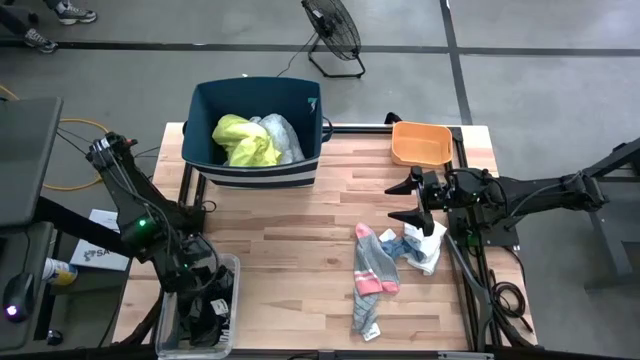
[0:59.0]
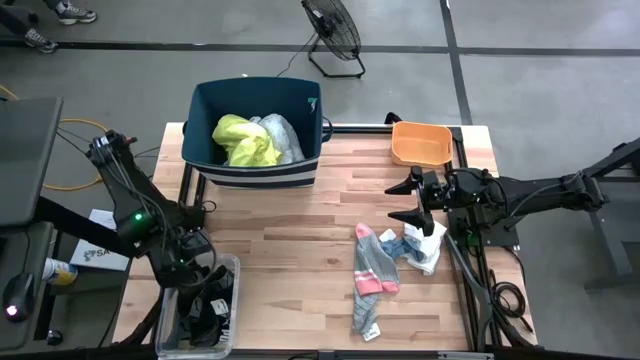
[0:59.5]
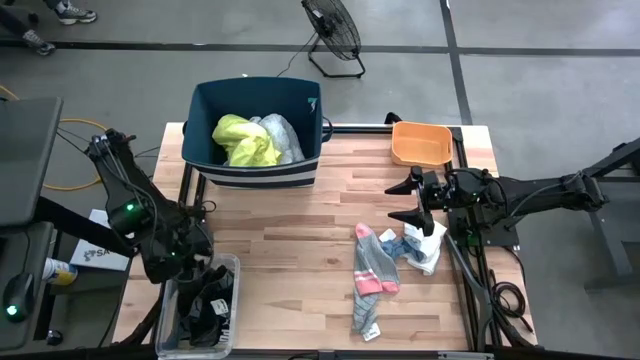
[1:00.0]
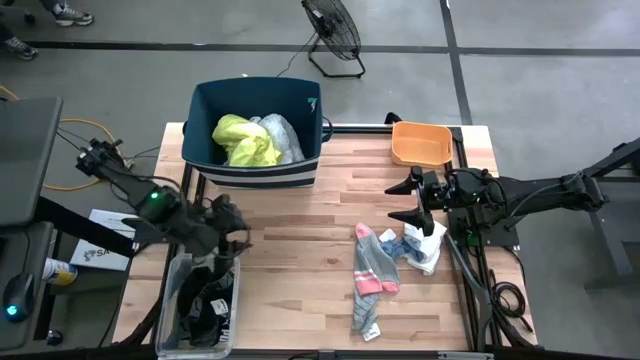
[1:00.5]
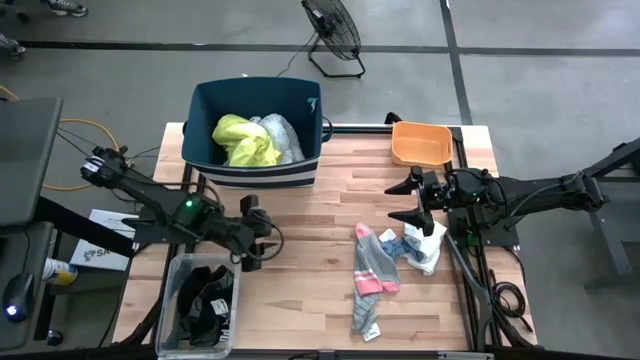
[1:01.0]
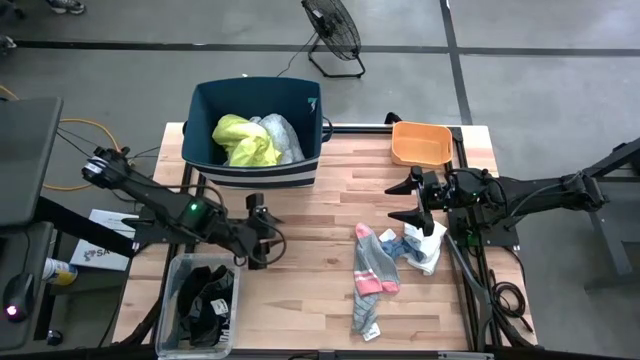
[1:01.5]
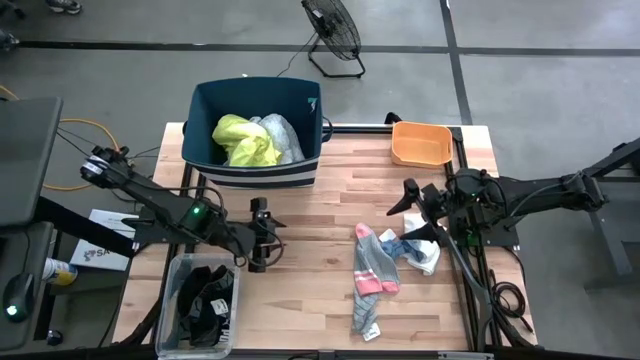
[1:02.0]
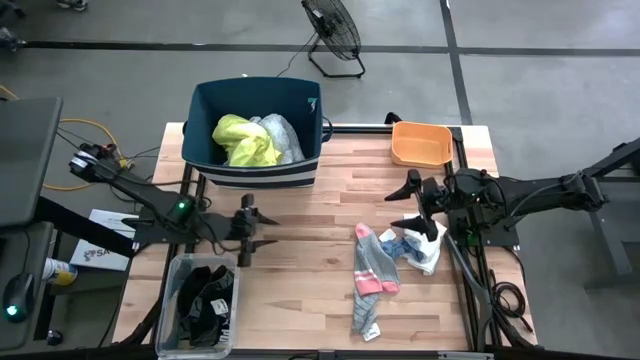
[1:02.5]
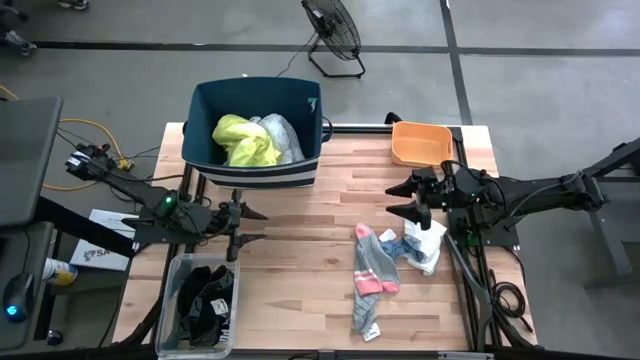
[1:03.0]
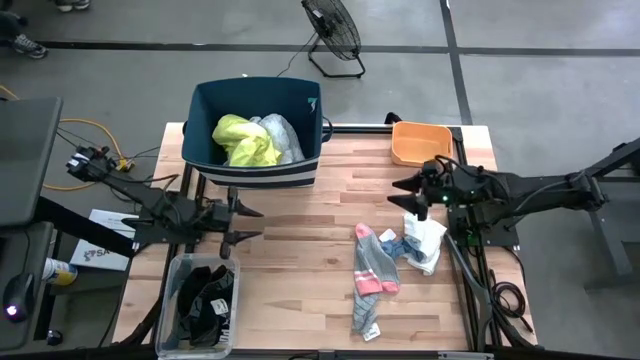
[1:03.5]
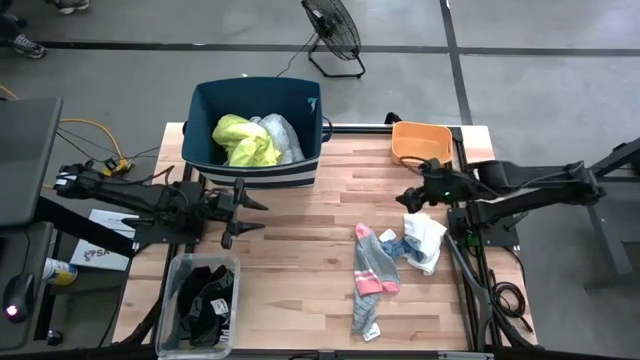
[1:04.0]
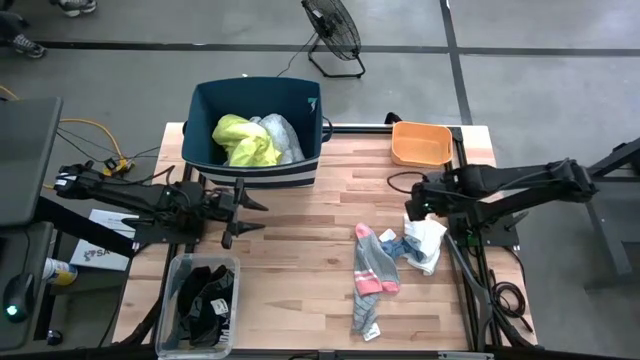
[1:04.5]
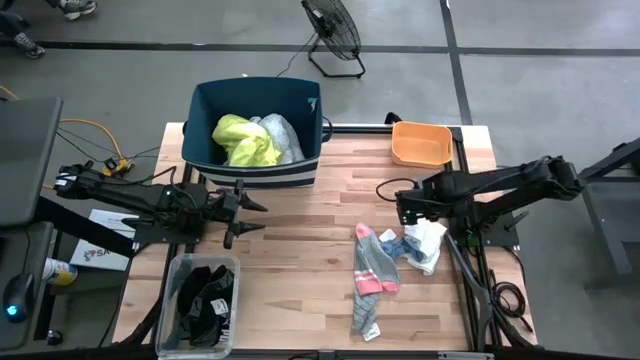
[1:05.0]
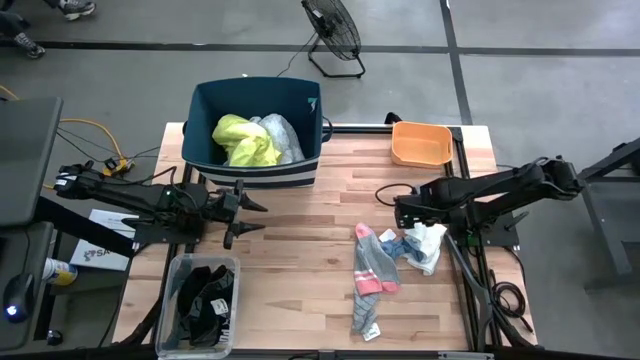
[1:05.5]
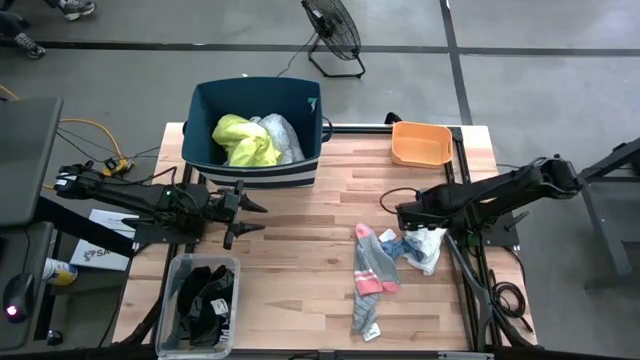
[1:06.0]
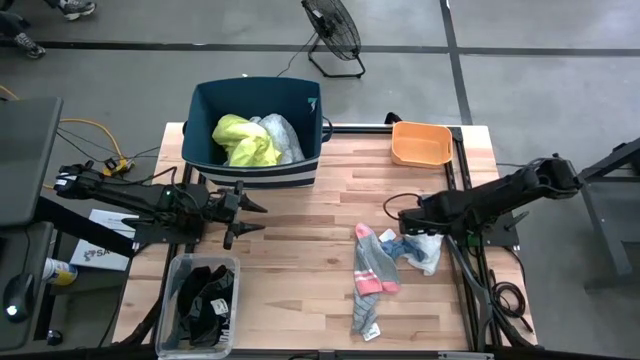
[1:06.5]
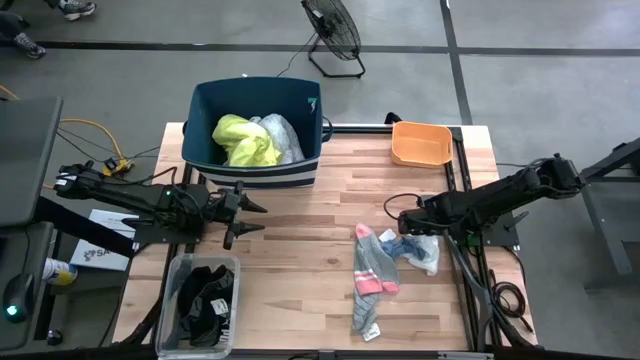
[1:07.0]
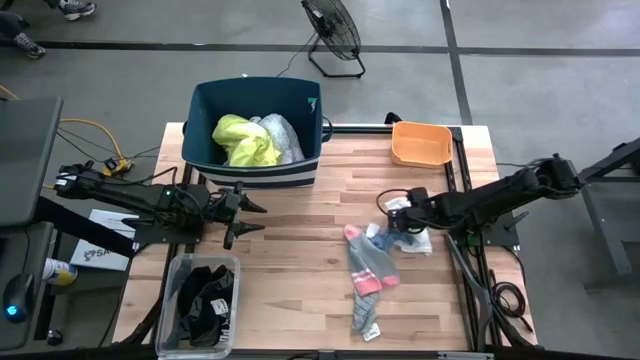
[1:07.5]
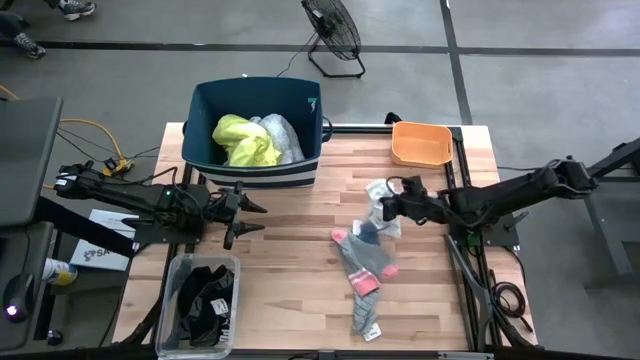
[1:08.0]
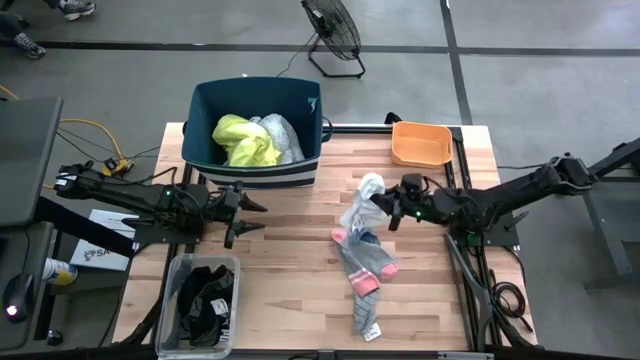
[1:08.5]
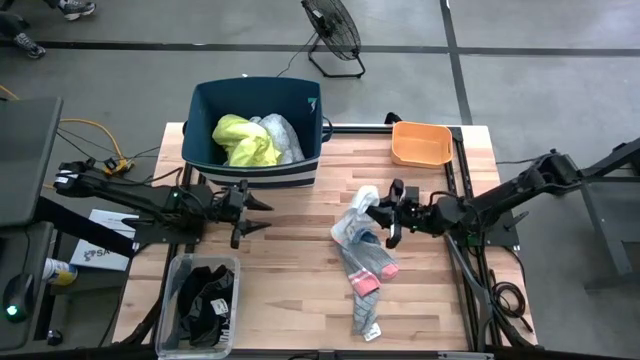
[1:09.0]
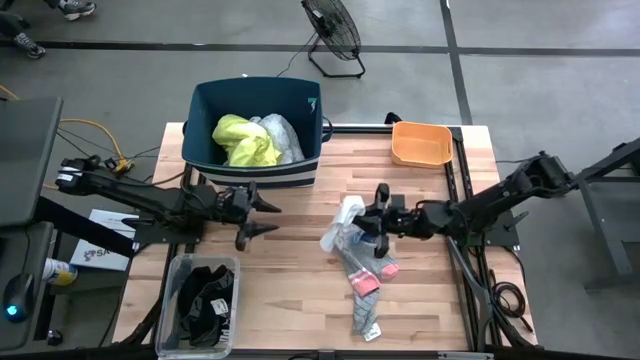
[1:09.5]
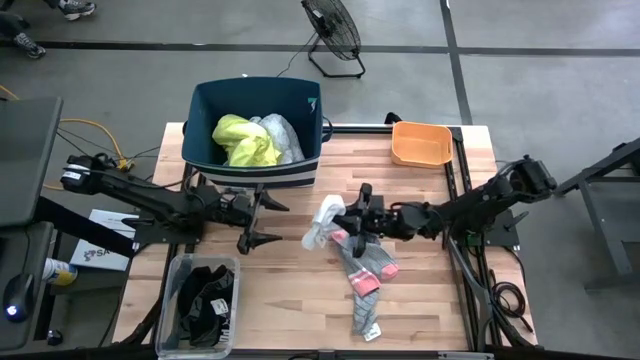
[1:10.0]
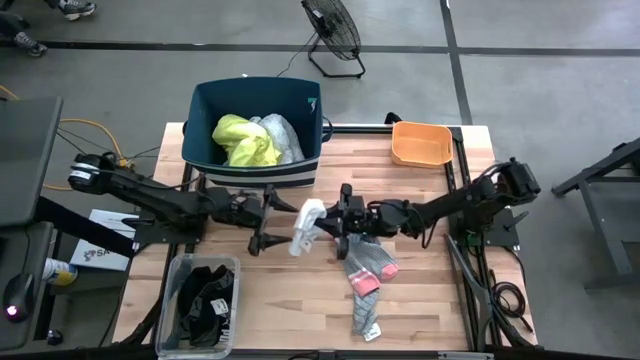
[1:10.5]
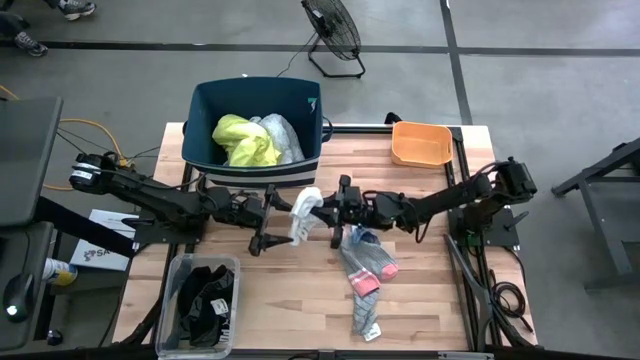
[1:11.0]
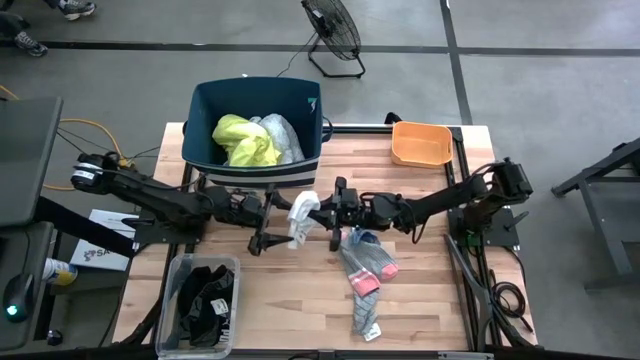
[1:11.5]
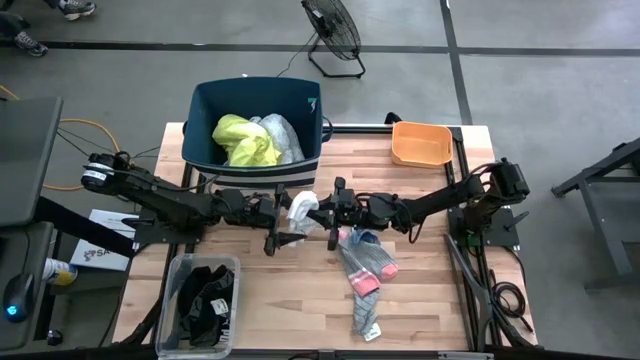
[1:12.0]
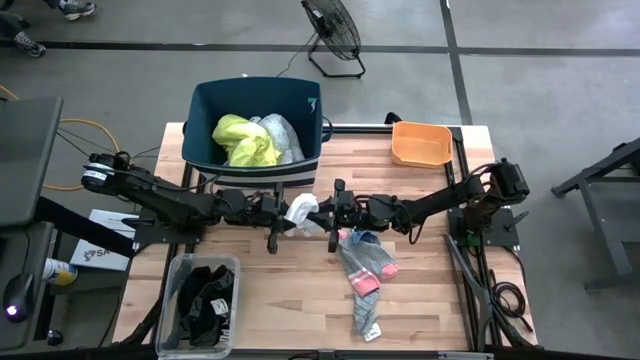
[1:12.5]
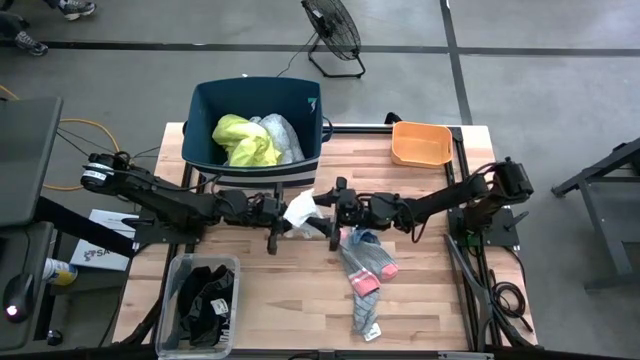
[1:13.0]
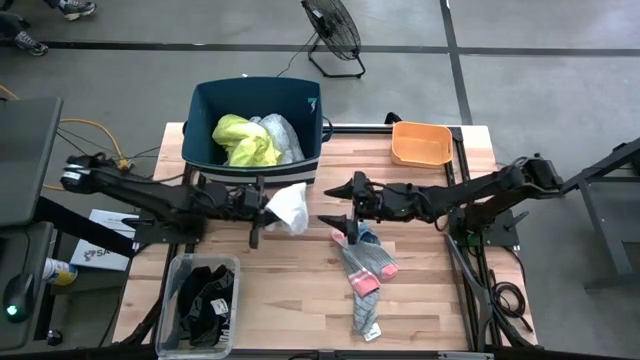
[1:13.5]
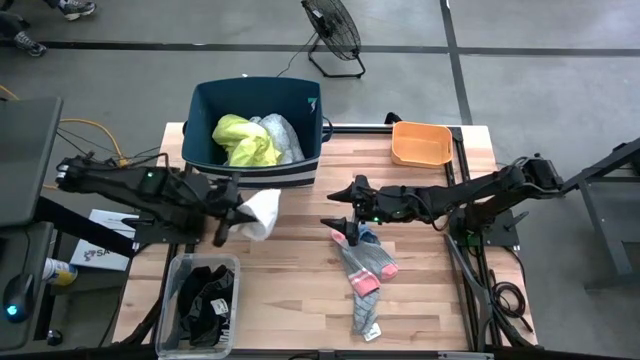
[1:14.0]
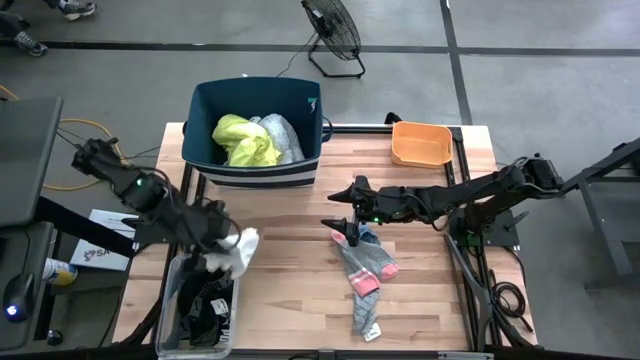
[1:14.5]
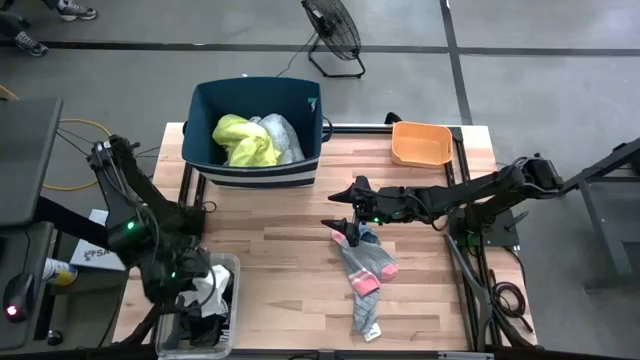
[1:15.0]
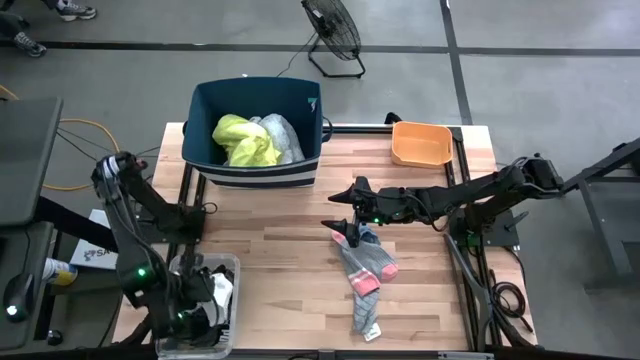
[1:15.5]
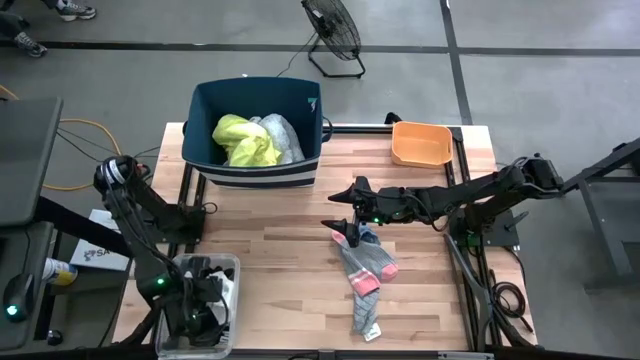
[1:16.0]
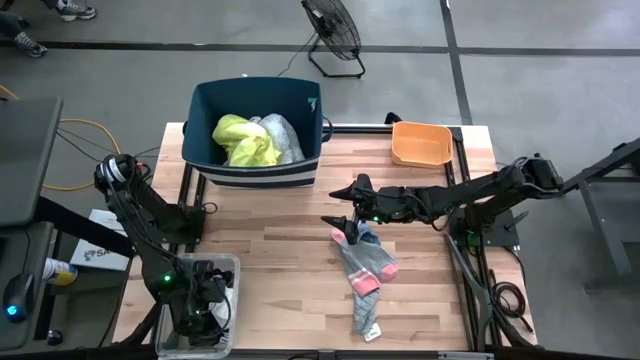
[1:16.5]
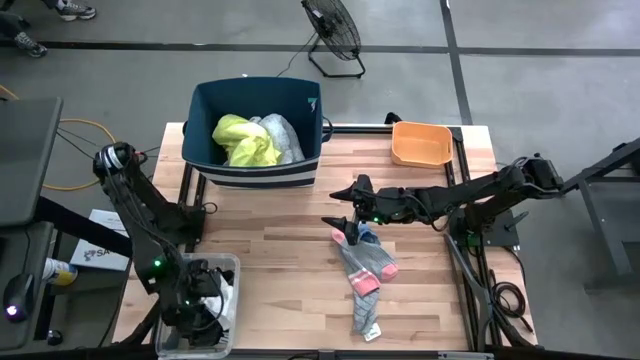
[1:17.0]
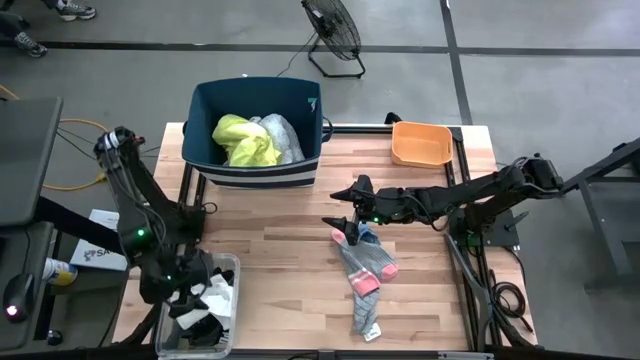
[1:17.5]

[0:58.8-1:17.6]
Task: Pick & Place Cloths
Put the white underwear into the transparent bin

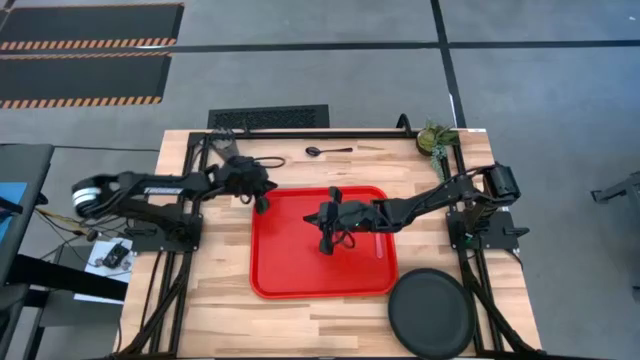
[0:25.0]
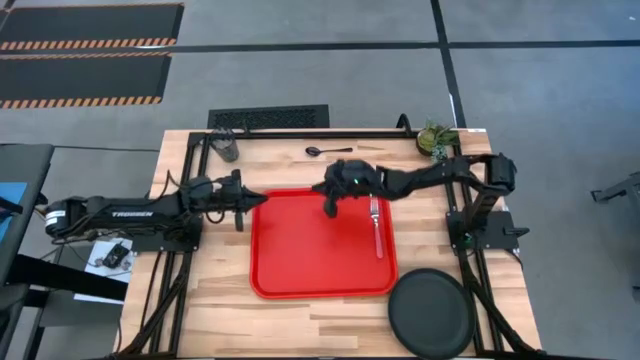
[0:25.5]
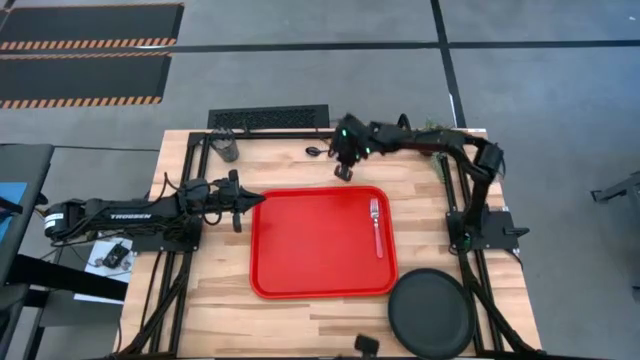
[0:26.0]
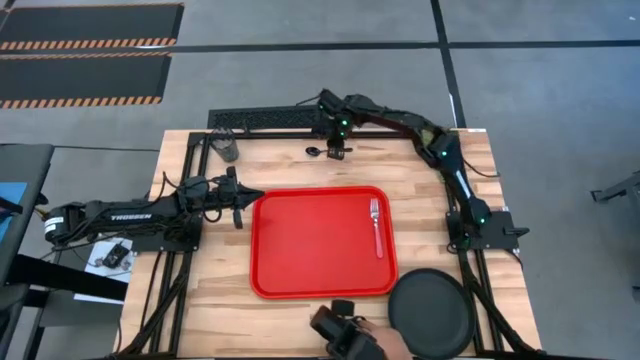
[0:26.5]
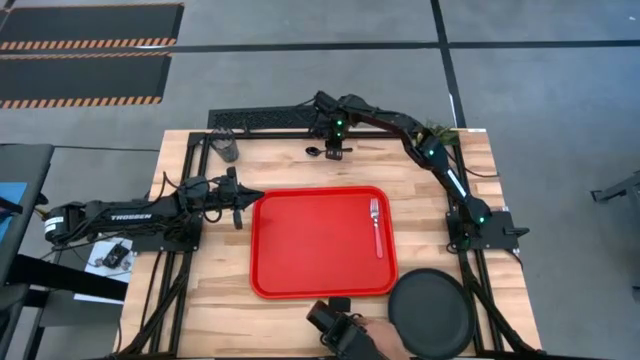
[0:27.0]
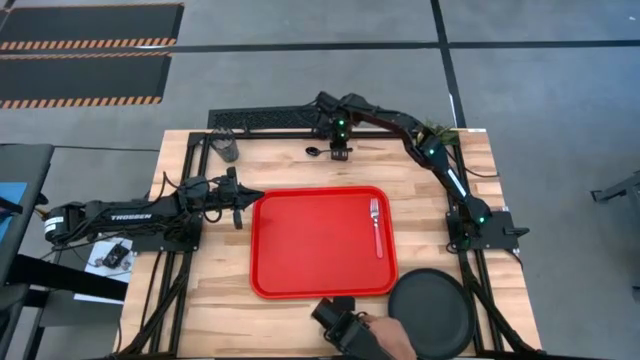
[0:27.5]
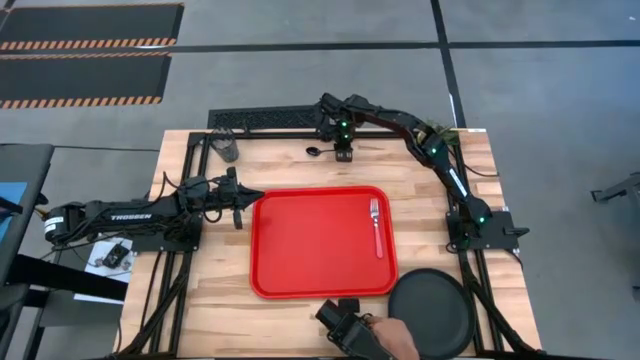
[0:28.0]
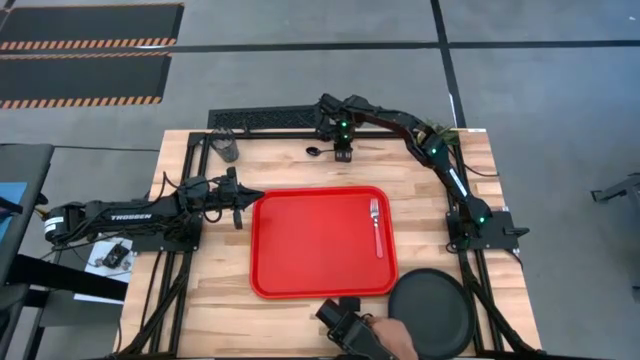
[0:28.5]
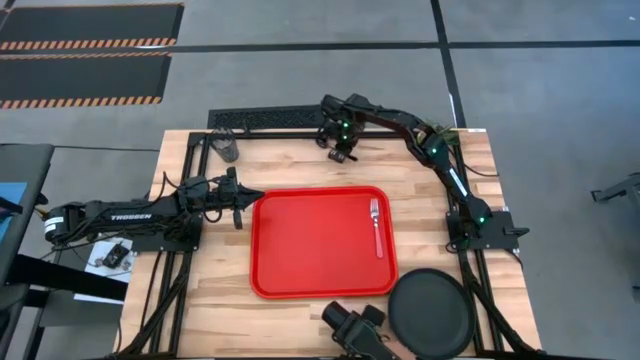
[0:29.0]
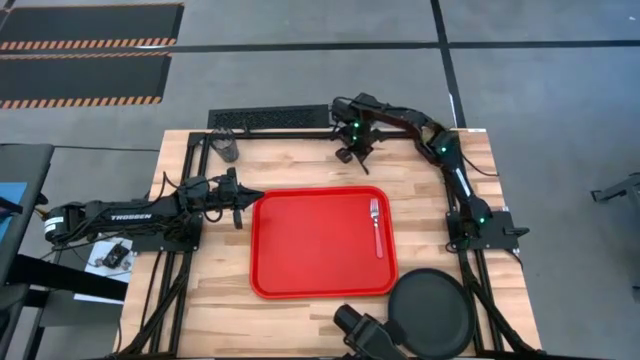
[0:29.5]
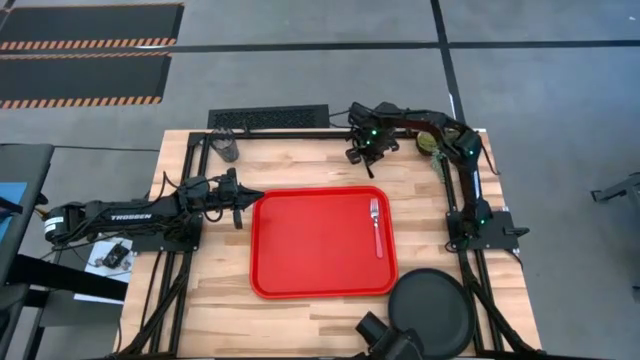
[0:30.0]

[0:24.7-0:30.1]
Task: Pick and place plate/cup/fork/spoon on tray
Put the black spoon to the left of the red fork on the red tray
